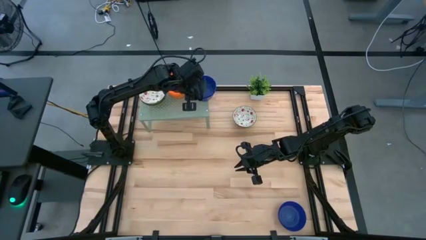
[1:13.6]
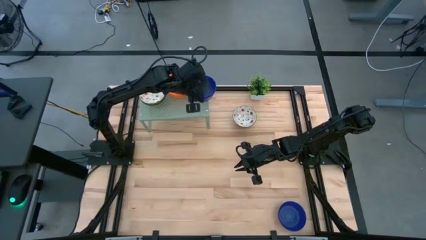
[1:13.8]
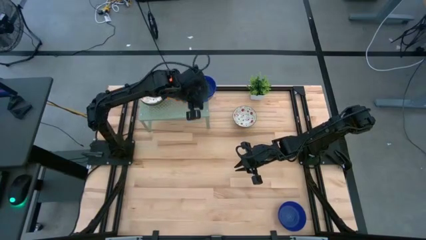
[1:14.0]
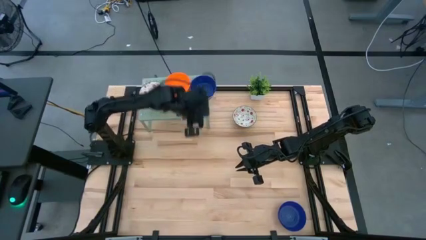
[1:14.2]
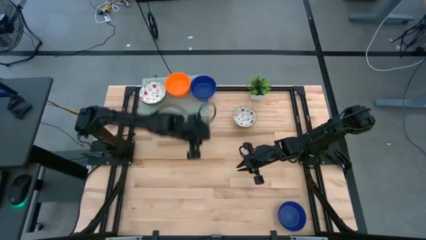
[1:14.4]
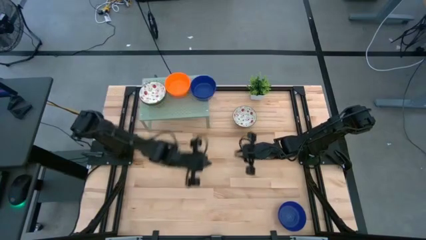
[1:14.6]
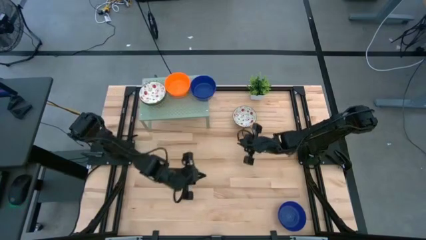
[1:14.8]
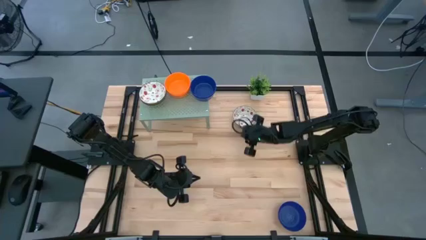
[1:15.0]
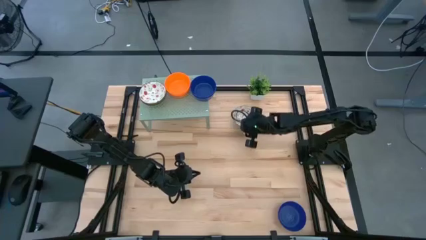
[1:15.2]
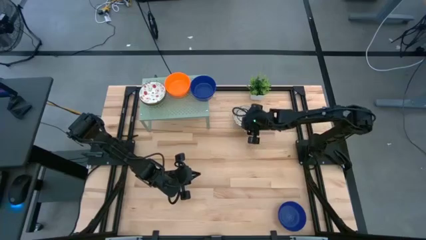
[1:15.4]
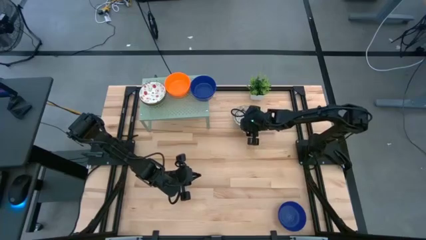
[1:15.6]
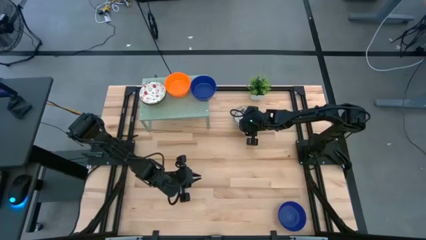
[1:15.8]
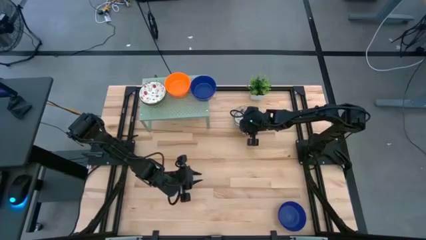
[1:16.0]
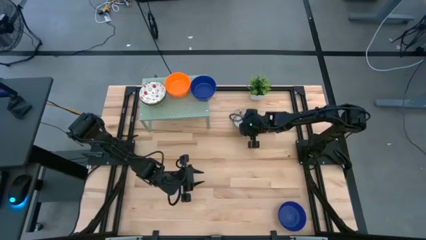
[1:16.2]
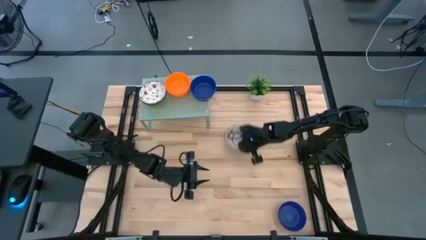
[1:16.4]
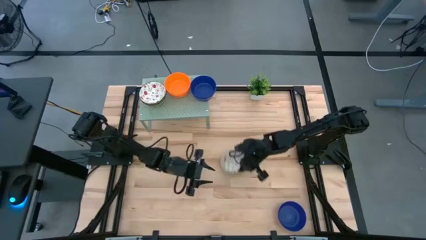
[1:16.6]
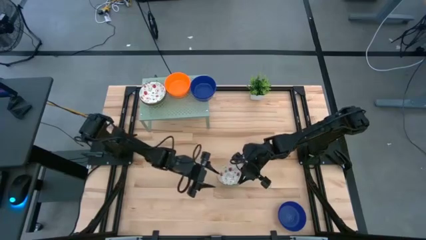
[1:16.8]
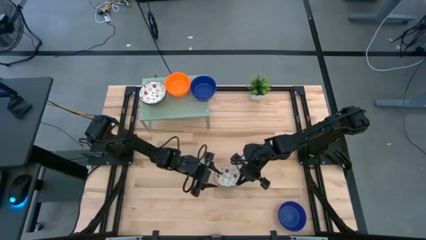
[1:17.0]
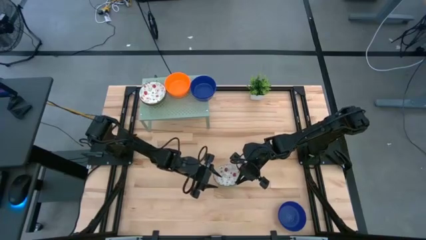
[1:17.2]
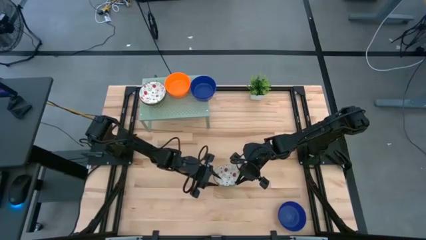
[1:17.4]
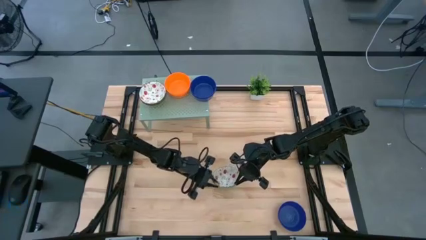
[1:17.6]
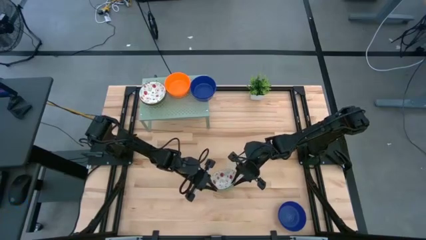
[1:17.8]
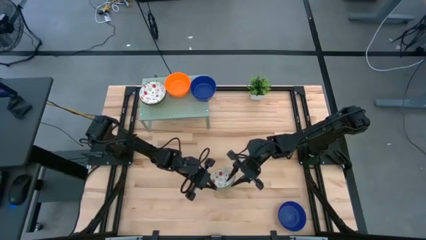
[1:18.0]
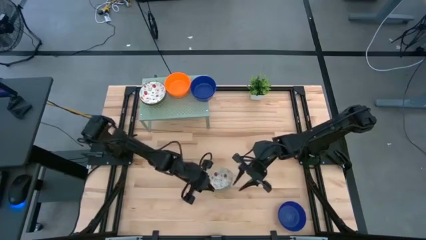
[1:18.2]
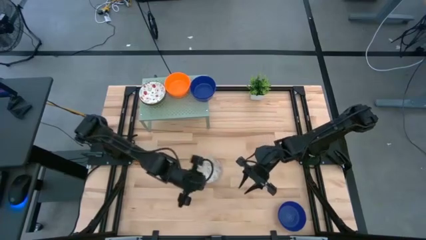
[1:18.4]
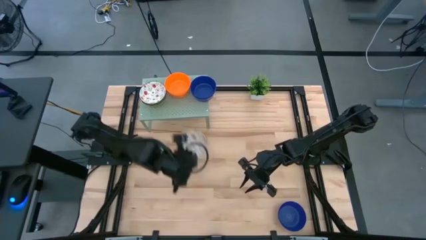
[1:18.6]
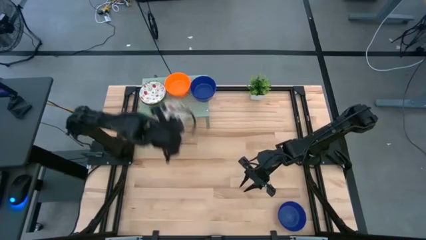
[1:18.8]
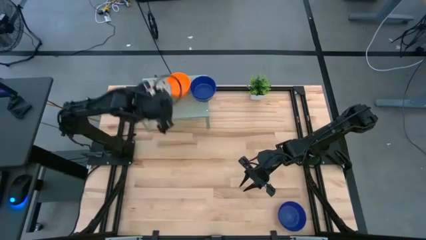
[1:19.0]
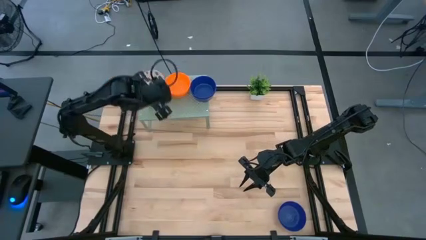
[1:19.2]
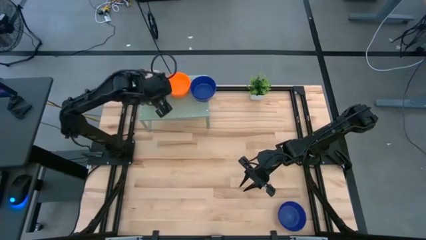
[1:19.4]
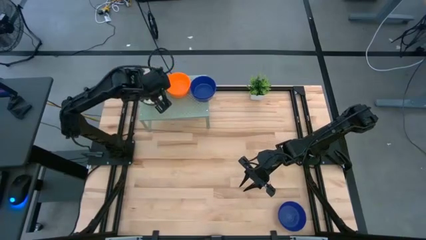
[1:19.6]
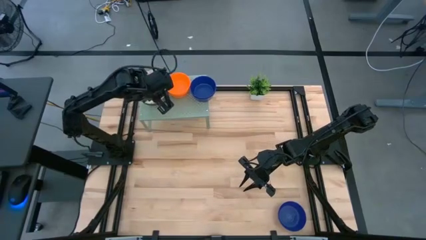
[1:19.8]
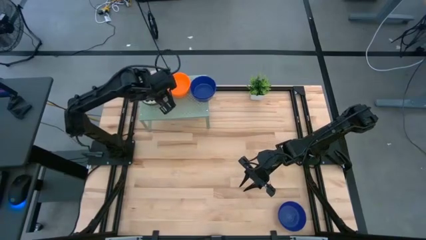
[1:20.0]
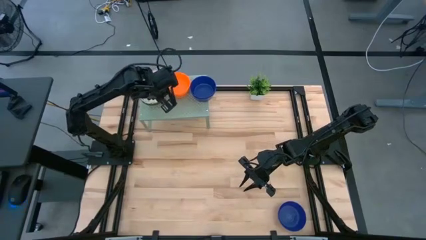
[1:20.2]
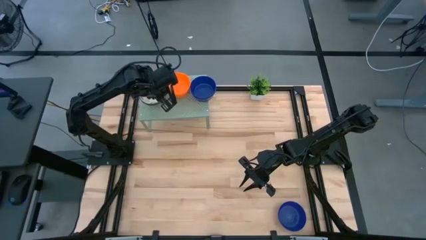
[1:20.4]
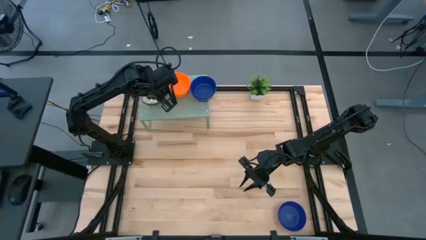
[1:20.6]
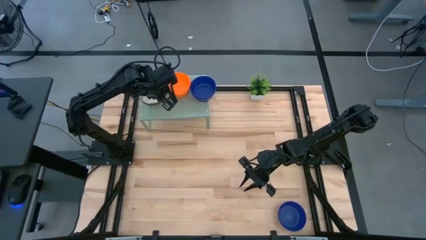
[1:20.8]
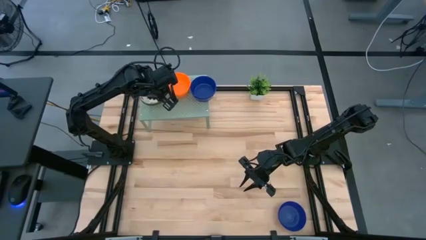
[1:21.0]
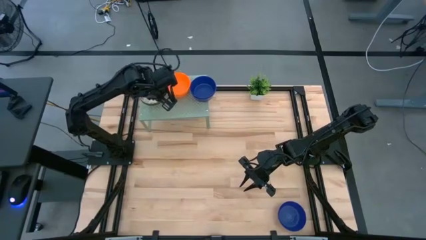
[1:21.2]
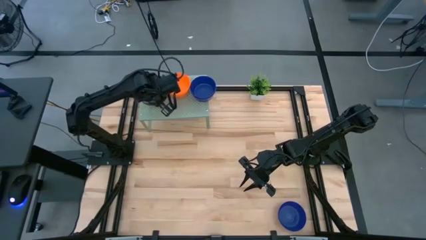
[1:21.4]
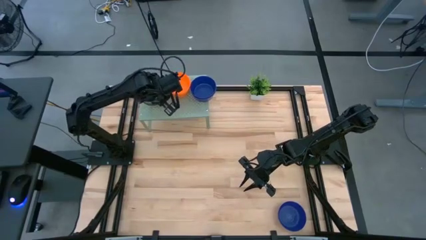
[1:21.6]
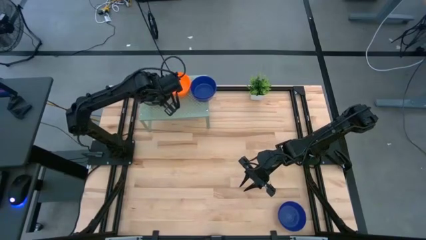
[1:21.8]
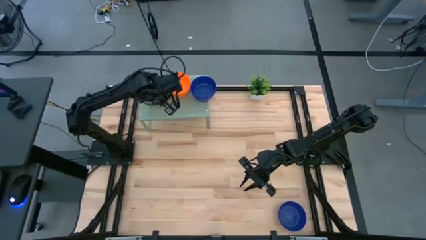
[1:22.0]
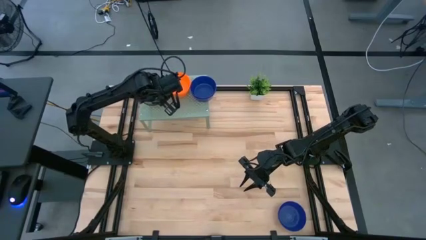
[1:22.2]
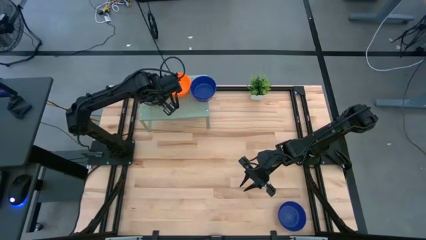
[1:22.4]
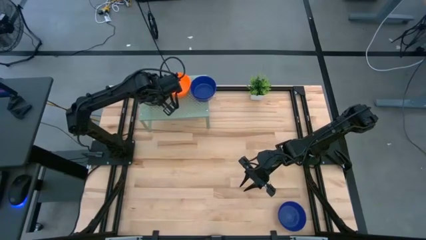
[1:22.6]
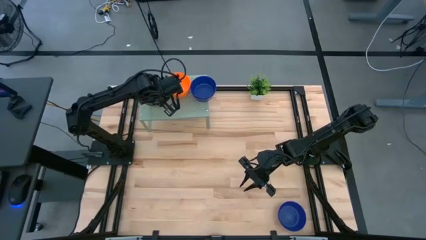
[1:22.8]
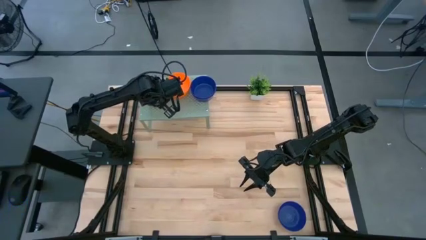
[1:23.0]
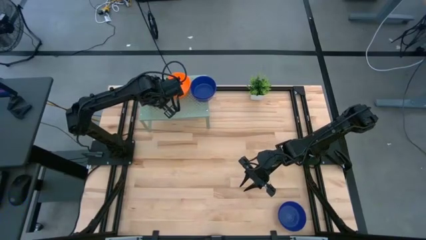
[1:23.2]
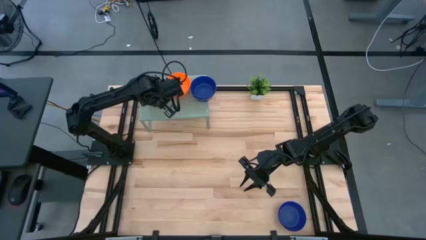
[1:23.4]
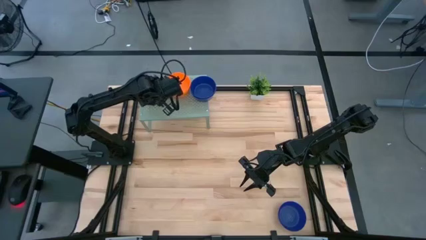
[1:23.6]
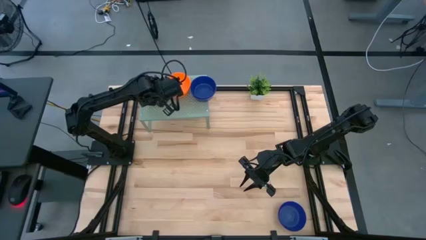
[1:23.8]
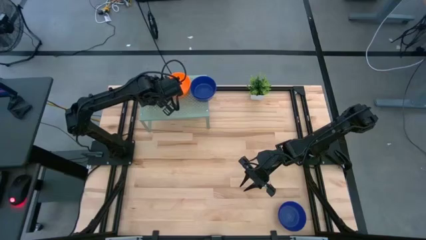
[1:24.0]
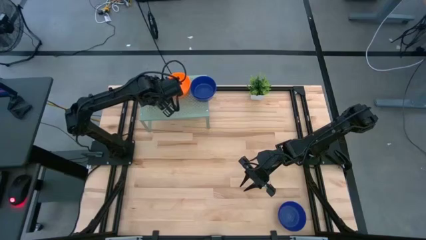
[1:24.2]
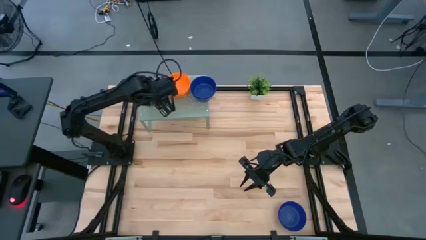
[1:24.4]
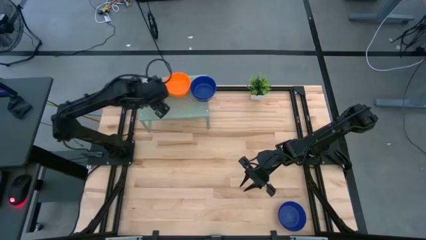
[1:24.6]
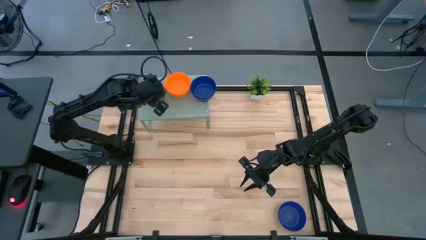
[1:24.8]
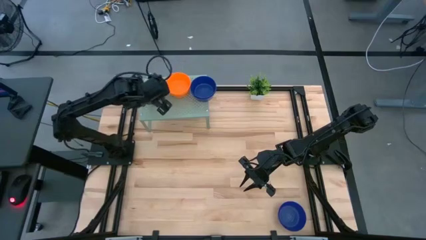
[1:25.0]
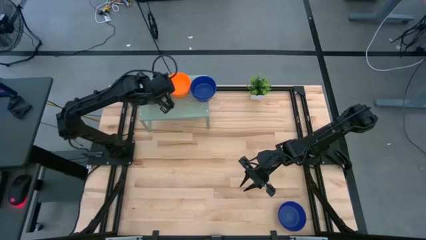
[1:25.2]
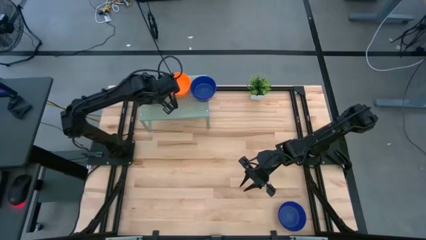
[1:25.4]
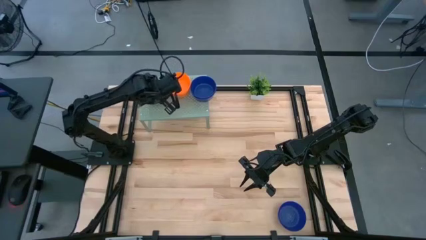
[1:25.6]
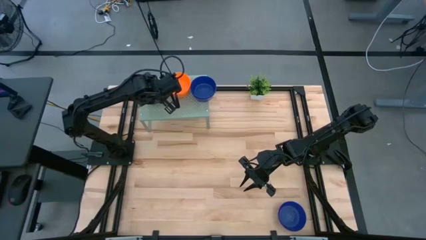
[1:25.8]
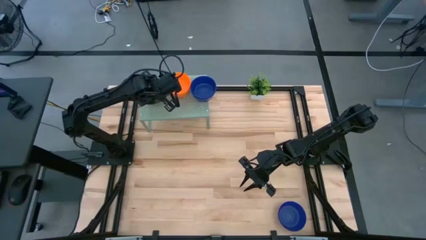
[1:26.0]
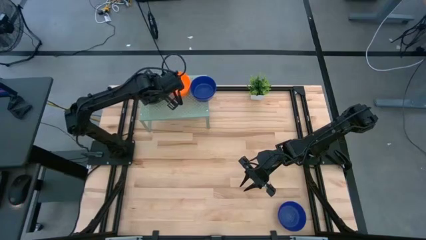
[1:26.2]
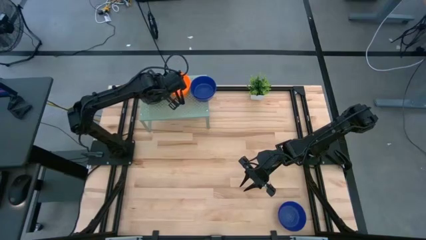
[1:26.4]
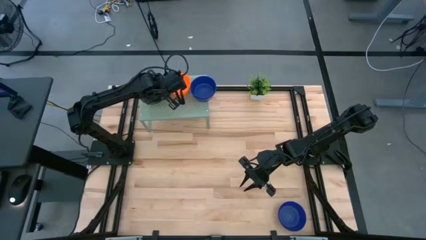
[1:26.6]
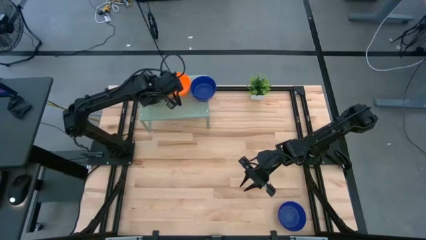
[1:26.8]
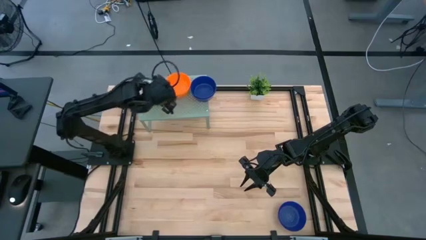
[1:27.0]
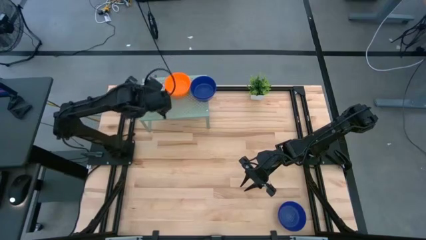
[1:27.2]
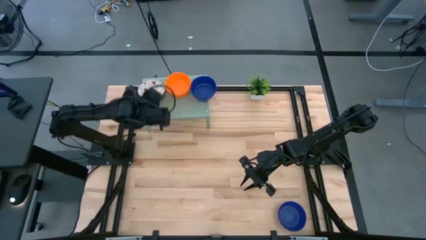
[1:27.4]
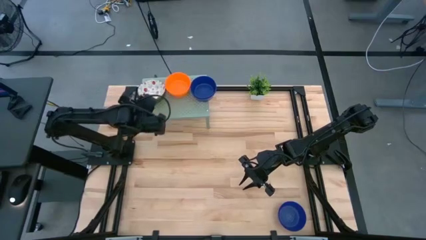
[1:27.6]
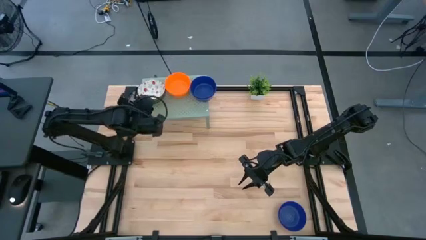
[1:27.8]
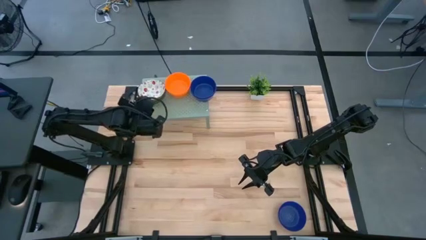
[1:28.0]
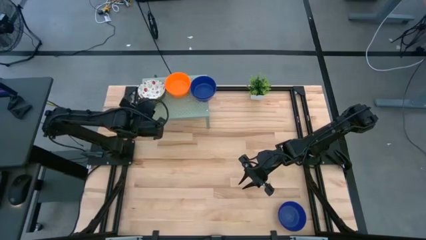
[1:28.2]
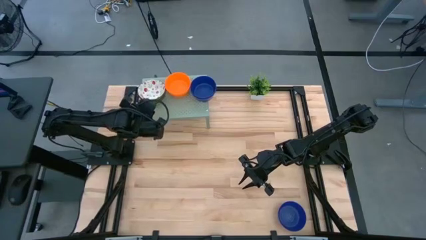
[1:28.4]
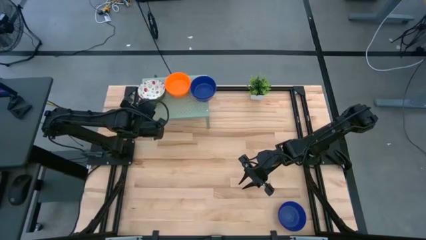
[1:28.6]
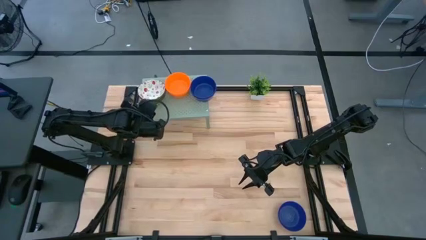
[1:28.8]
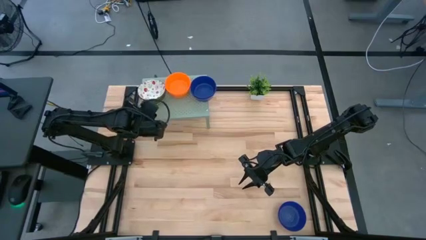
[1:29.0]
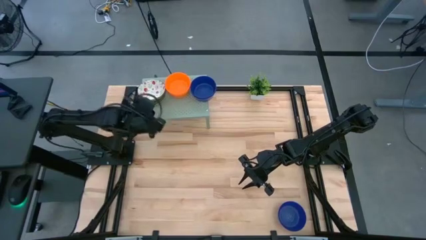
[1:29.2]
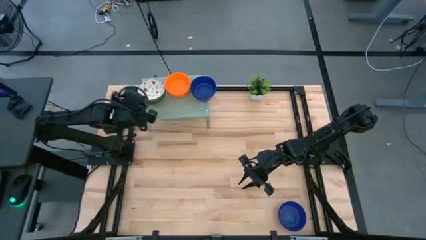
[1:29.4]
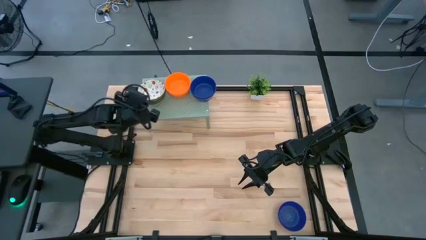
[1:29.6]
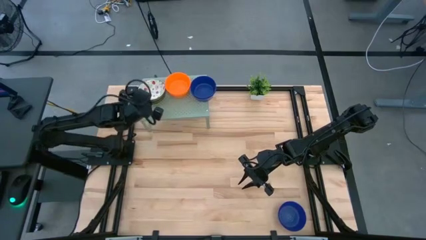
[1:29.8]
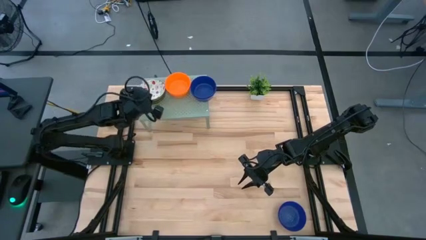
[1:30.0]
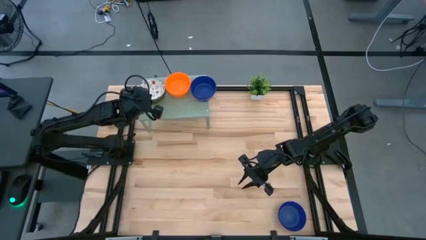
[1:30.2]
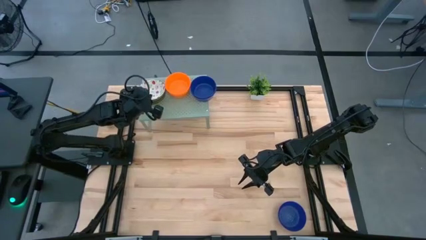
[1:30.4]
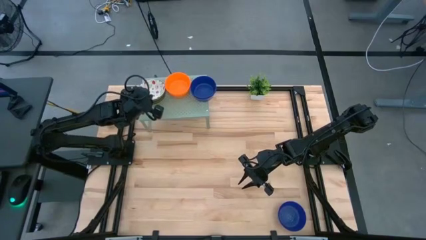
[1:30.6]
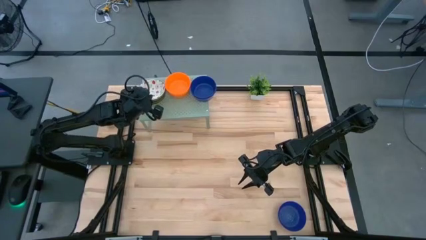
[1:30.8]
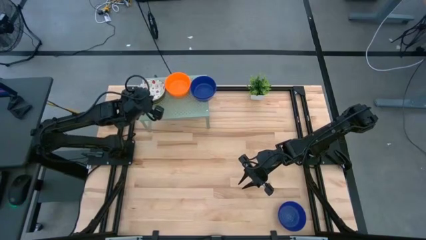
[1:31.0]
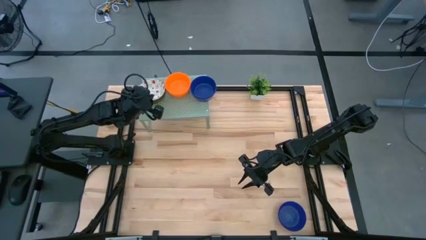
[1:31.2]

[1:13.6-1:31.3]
Task: Pick & Place Mini bowls
Stack the white patterned bowl on top of the other white patterned bowls on the shelf
